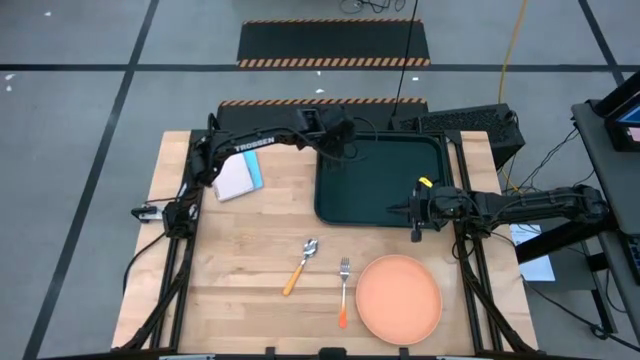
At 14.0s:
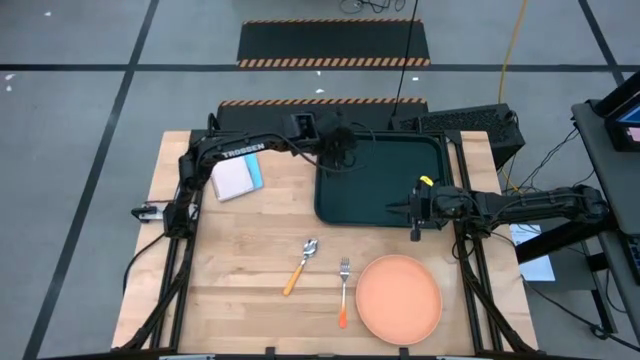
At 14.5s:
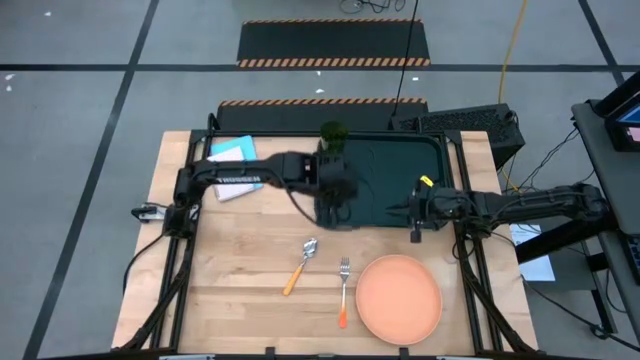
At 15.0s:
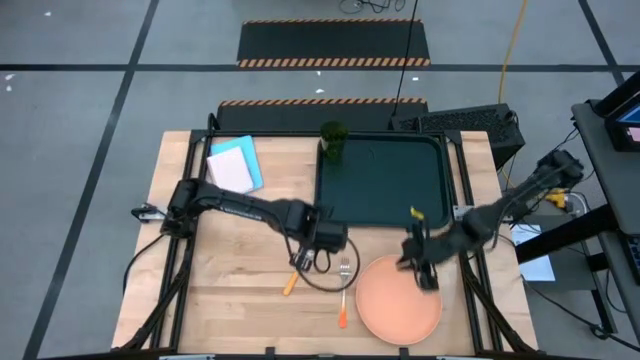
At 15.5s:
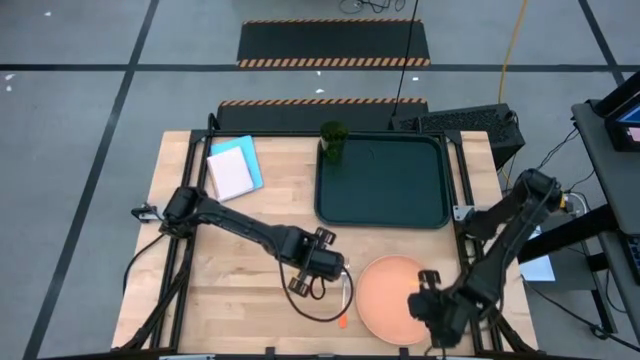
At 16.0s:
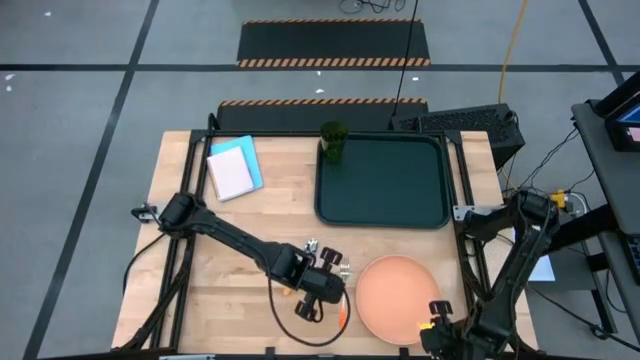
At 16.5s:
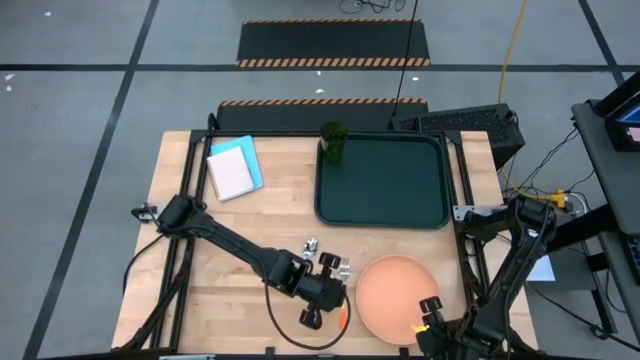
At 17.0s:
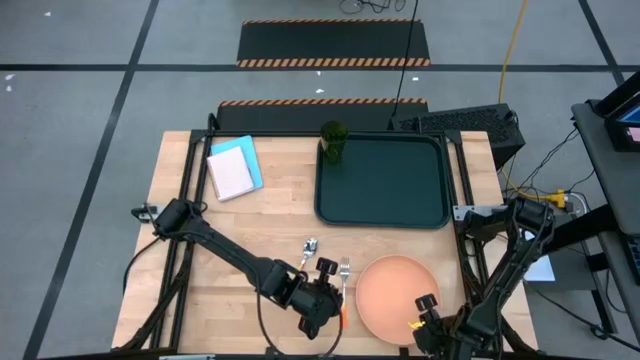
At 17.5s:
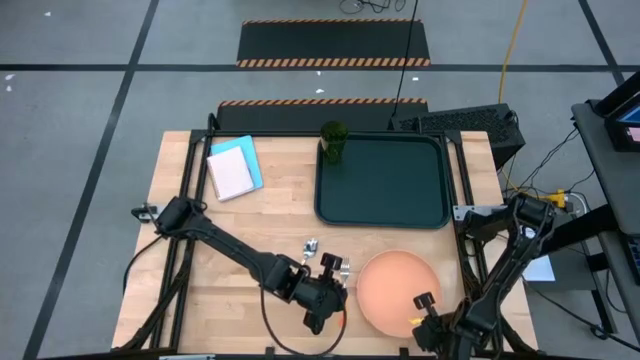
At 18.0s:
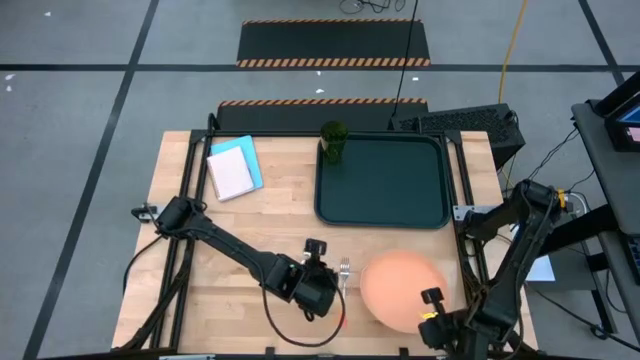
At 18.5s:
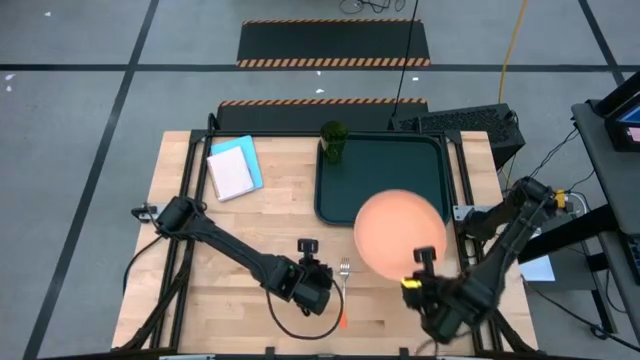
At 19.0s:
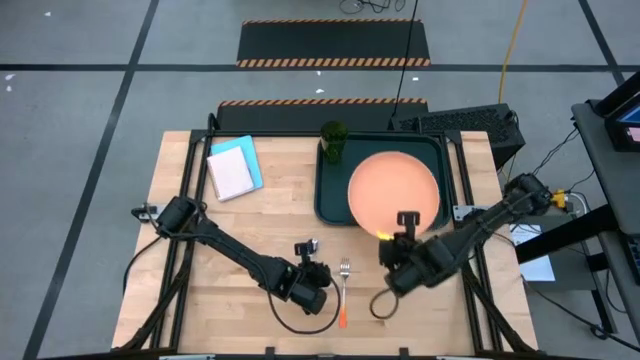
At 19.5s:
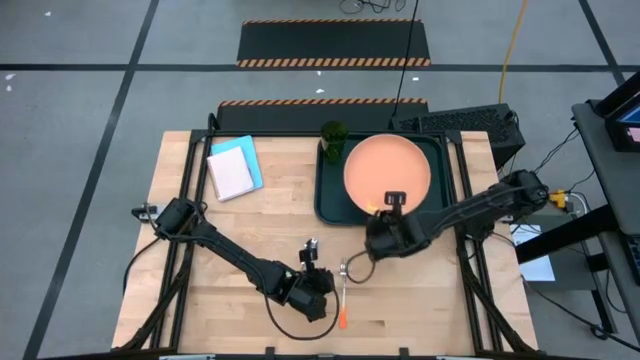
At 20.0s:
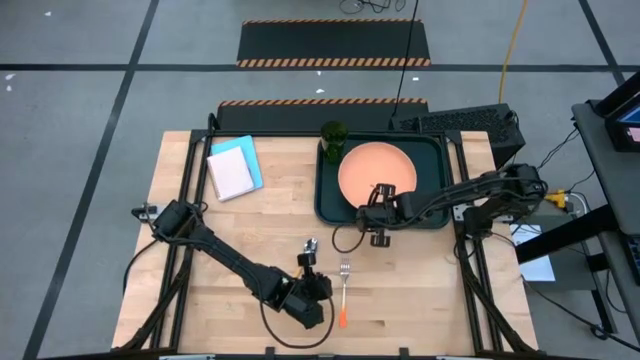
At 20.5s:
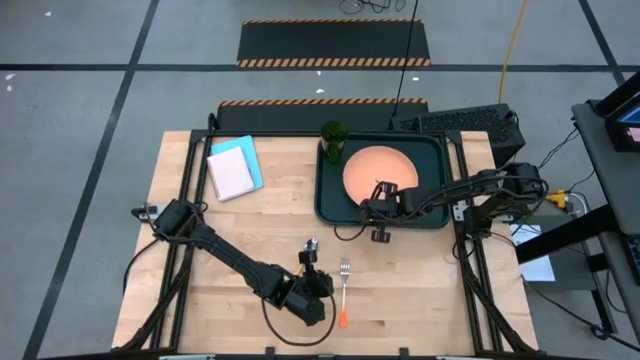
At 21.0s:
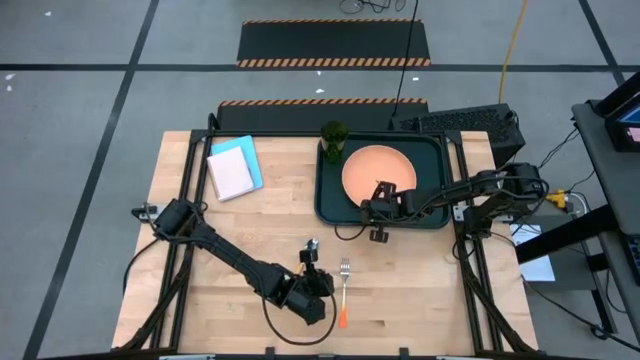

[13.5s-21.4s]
Task: Pick and place plate/cup/fork/spoon on tray
Put the orange plate on the black tray

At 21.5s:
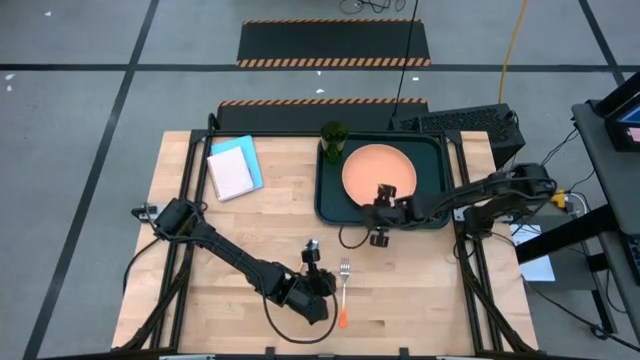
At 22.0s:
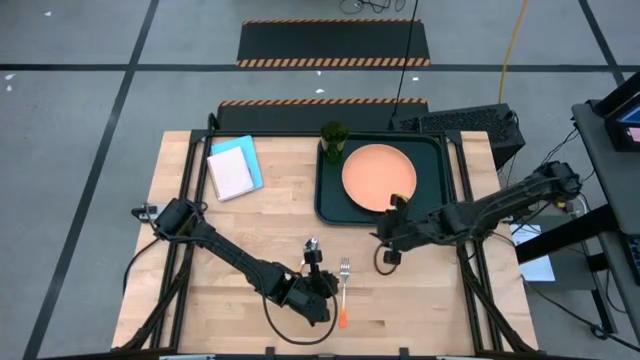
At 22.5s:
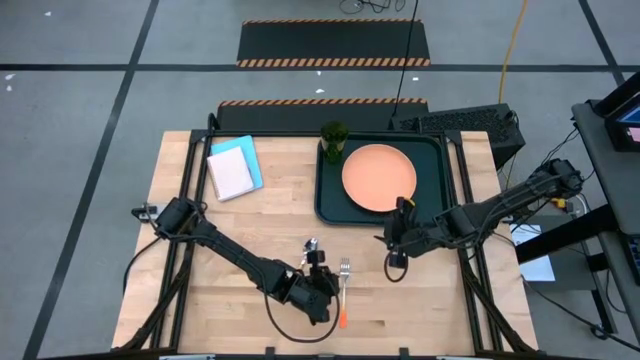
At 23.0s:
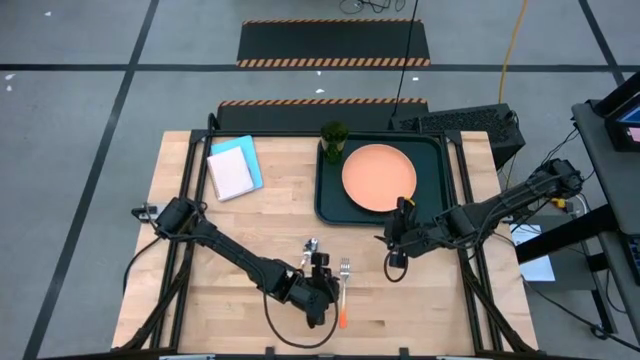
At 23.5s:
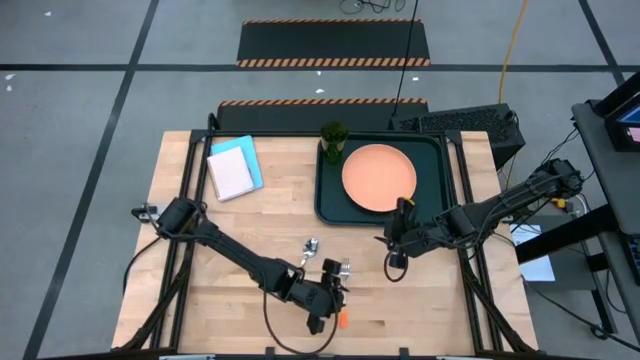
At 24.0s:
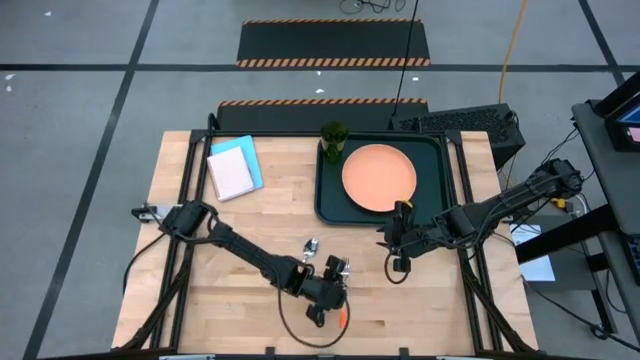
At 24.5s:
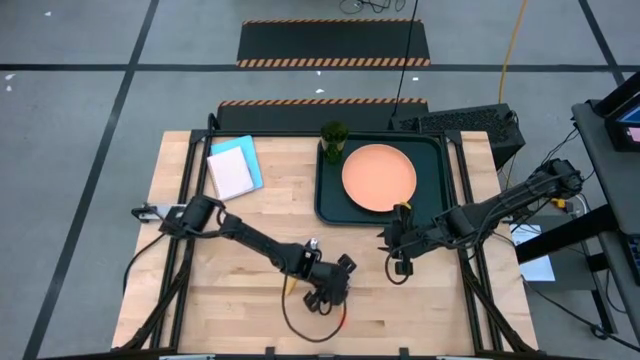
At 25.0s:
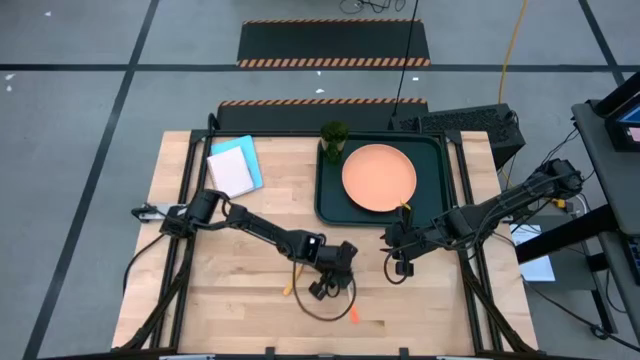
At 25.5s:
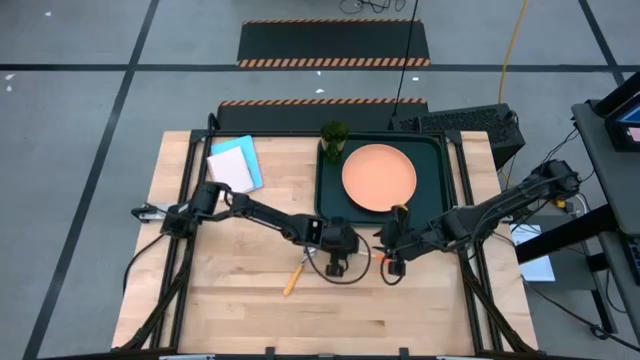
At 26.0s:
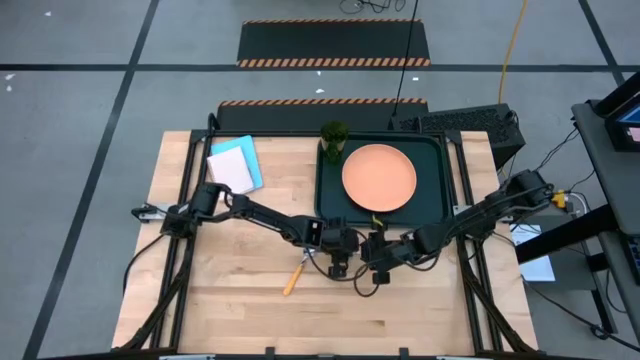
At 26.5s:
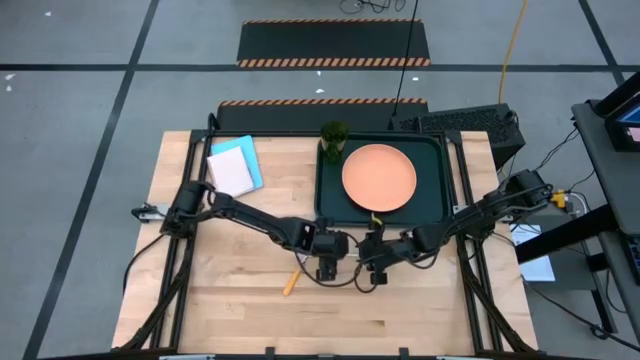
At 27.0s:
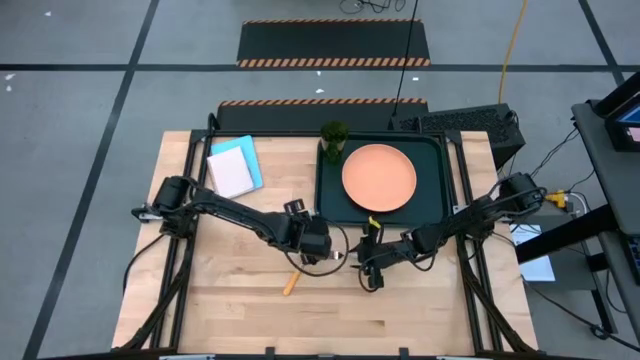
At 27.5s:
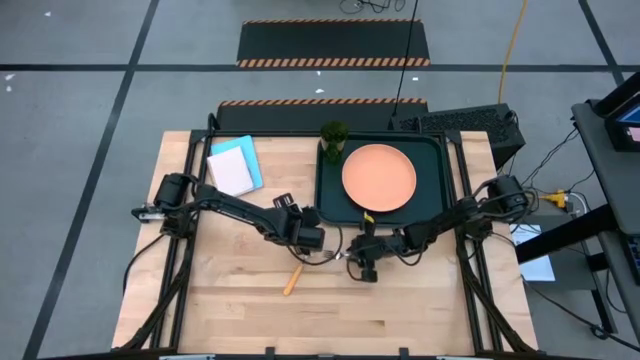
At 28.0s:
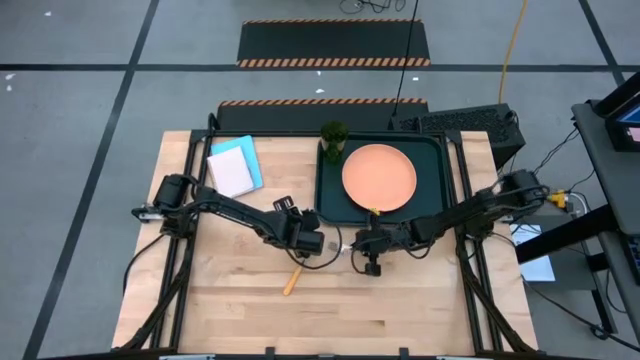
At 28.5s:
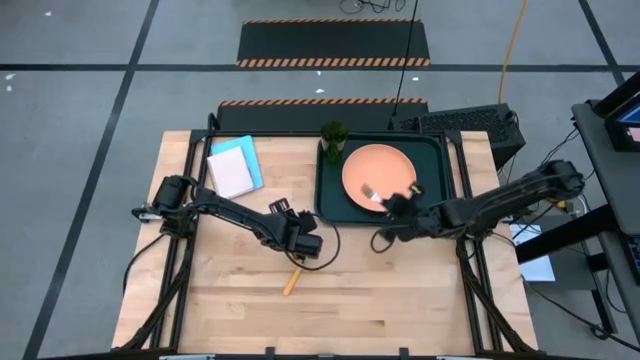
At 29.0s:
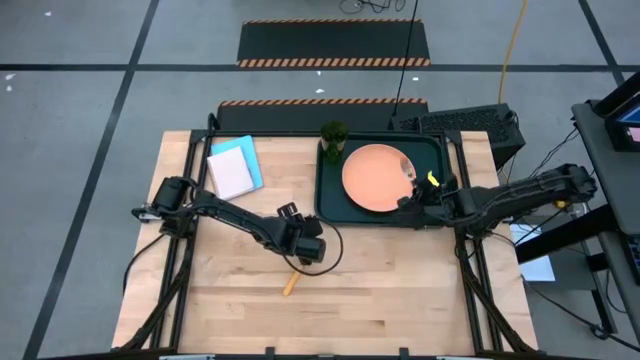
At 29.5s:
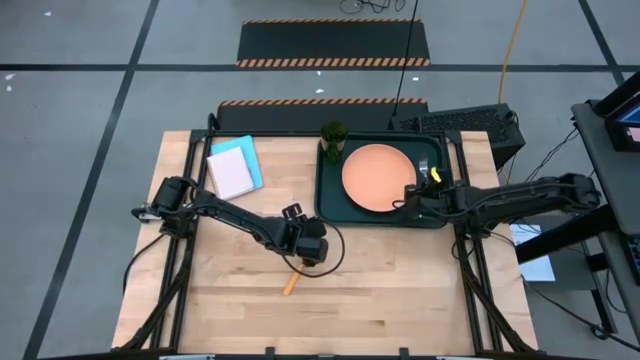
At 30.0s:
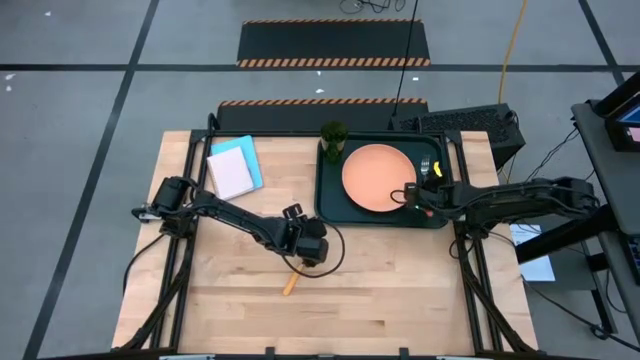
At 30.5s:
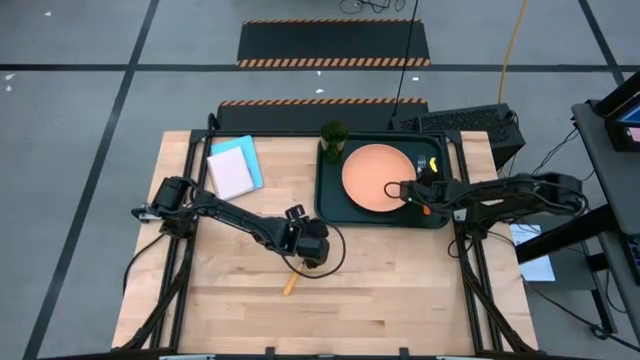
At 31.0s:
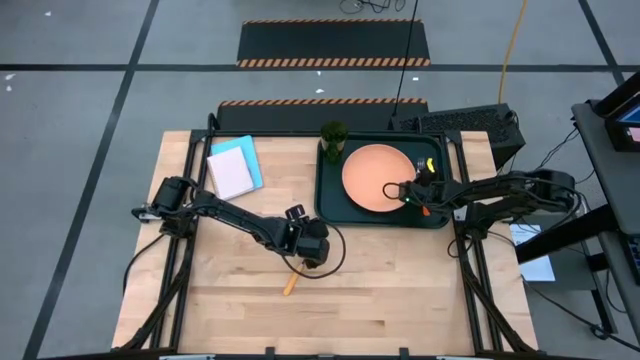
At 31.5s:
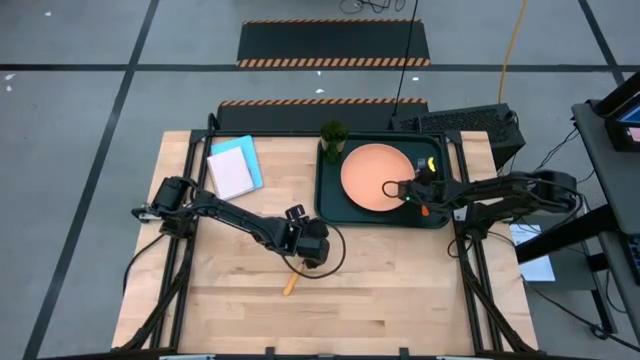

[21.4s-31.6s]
Put the orange fork to the right of the orange plate on the black tray

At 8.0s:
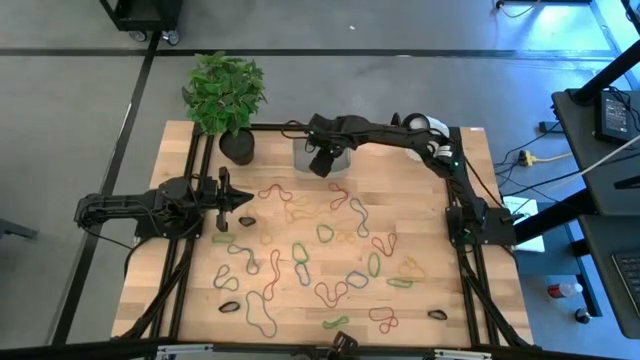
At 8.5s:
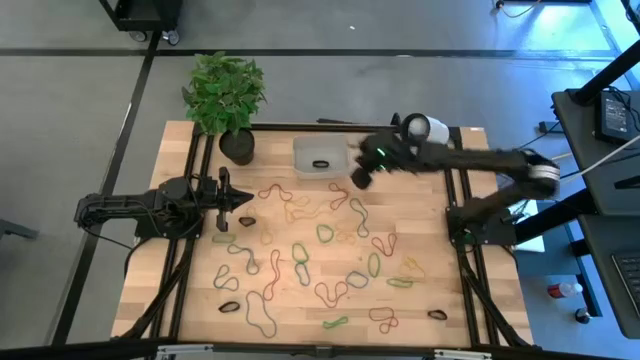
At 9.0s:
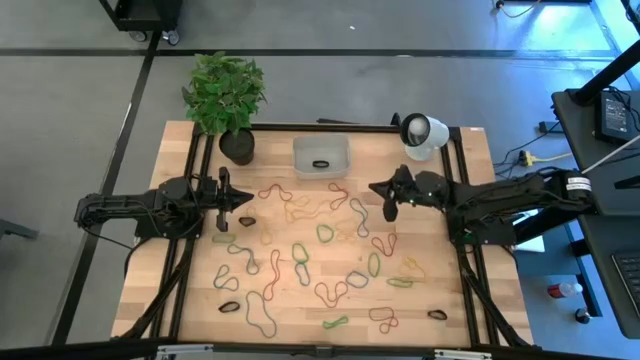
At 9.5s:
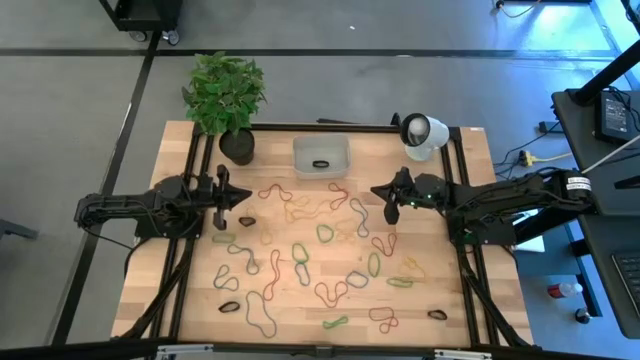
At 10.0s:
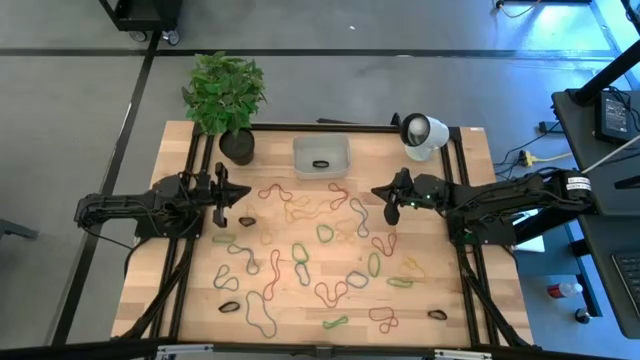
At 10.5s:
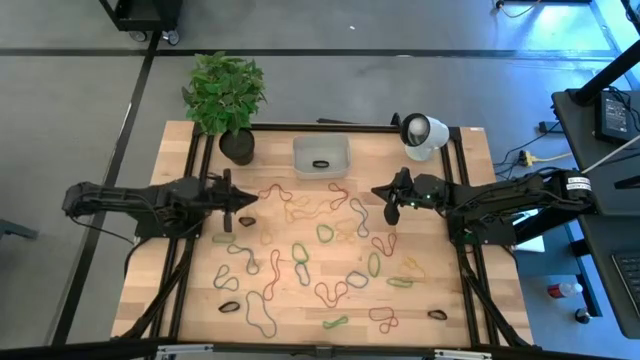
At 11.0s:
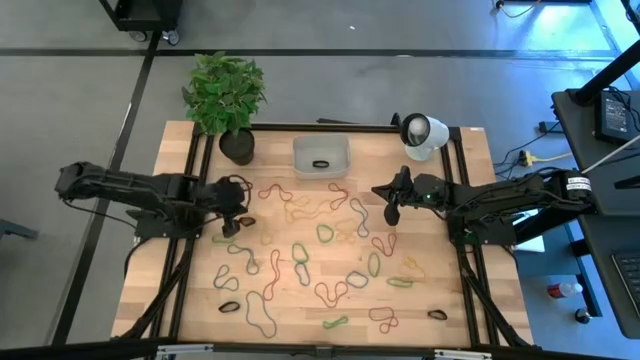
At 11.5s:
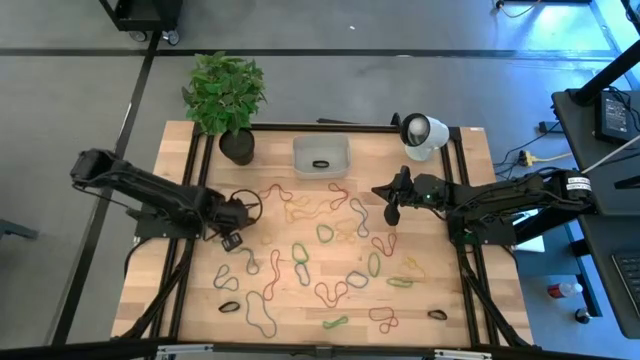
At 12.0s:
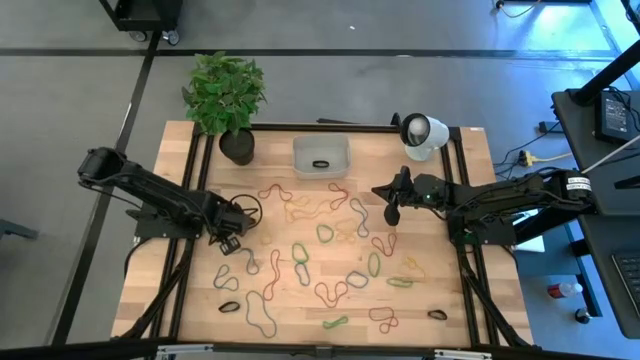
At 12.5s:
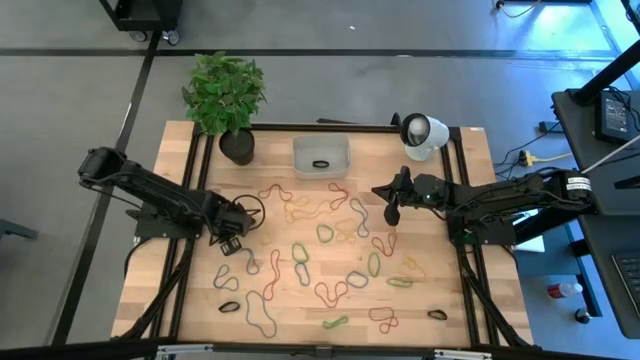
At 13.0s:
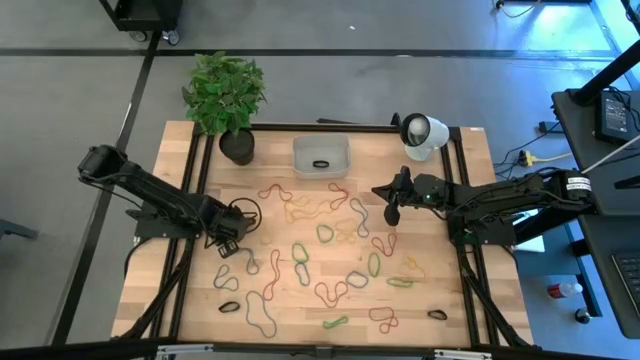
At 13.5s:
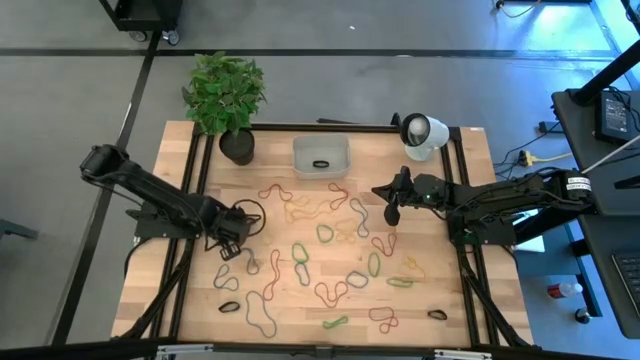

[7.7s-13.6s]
Task: Pick and place rubber bands into bin
Put the green rubber band into the gray bin
